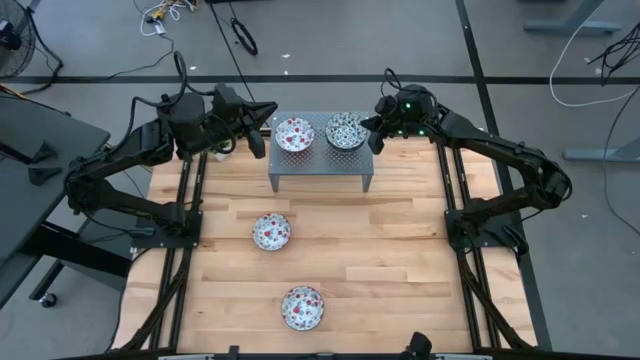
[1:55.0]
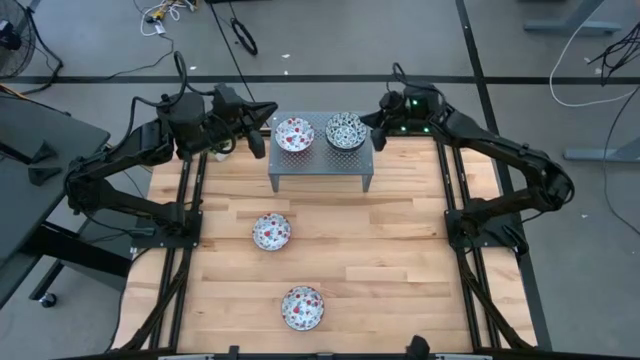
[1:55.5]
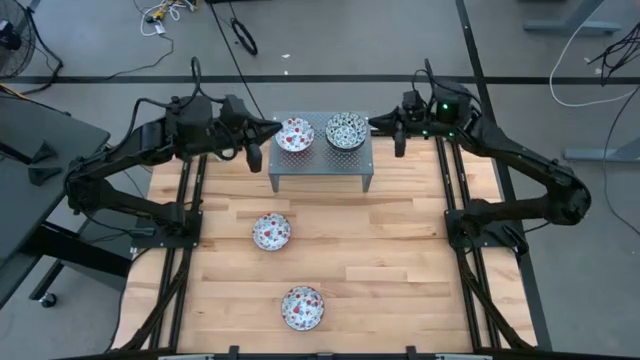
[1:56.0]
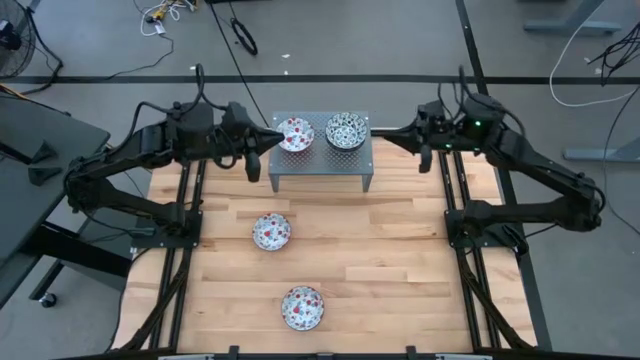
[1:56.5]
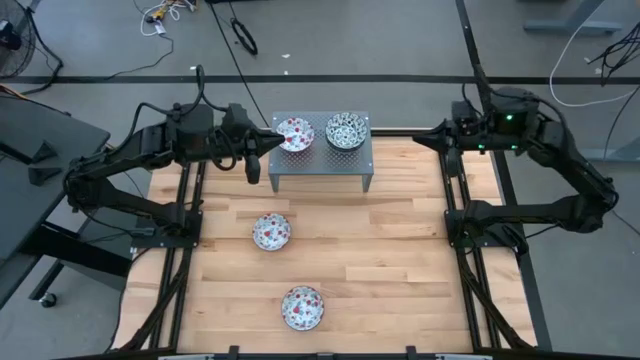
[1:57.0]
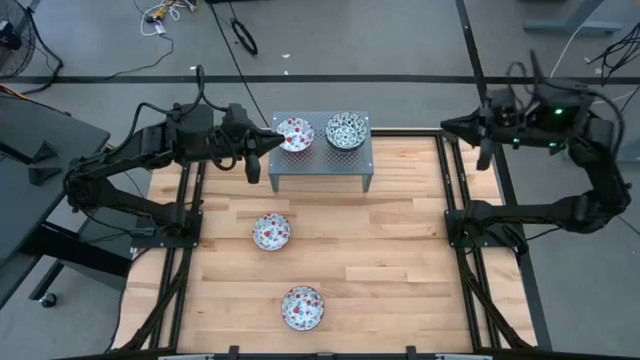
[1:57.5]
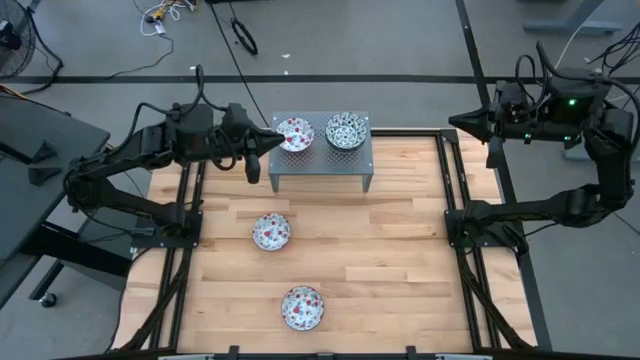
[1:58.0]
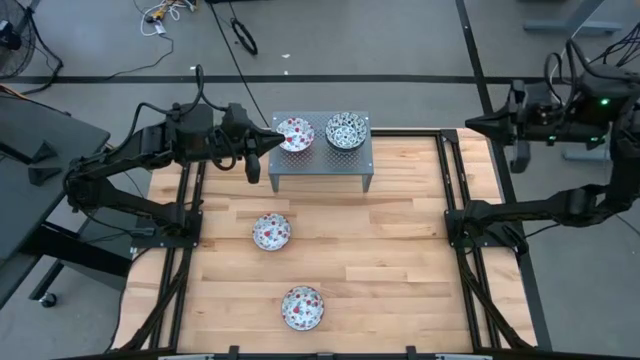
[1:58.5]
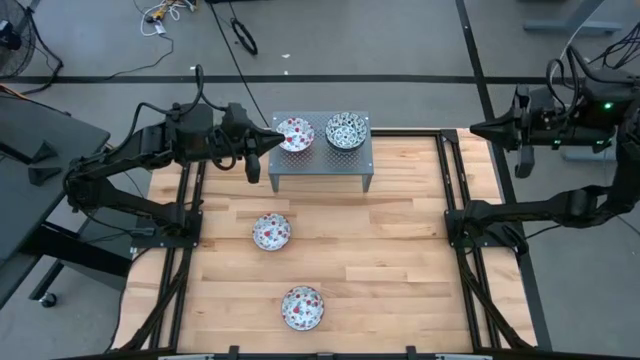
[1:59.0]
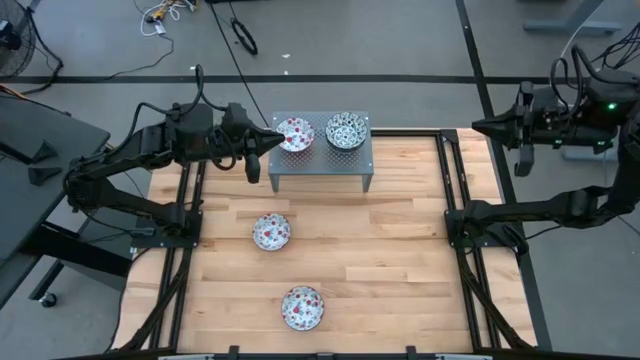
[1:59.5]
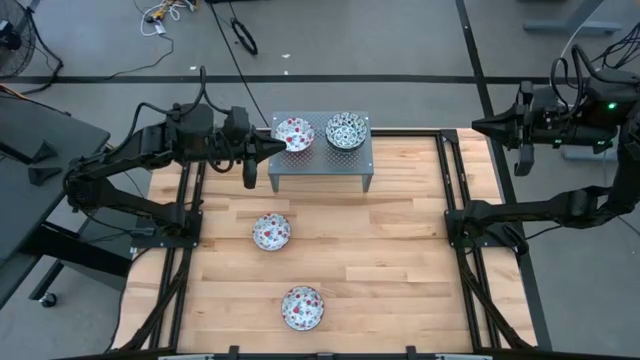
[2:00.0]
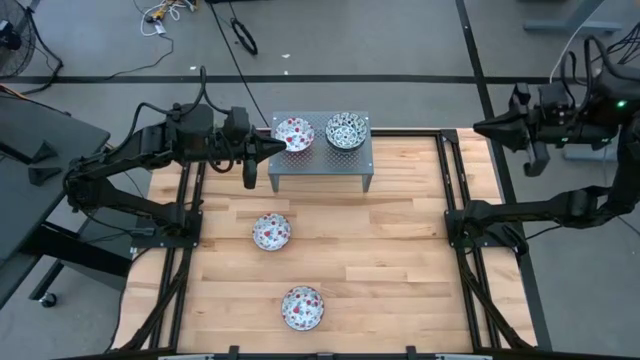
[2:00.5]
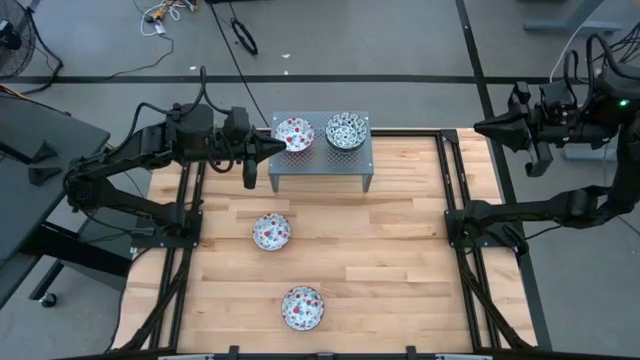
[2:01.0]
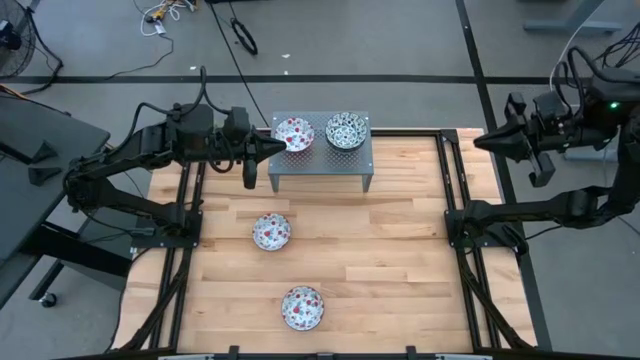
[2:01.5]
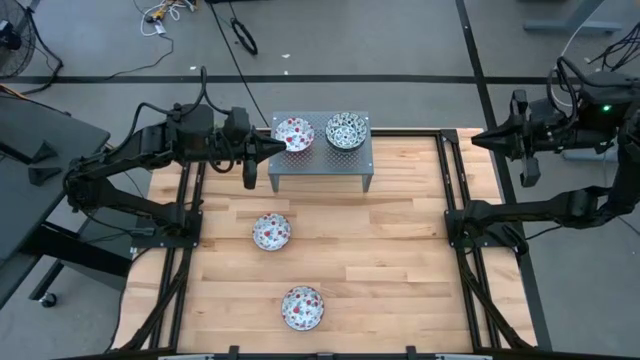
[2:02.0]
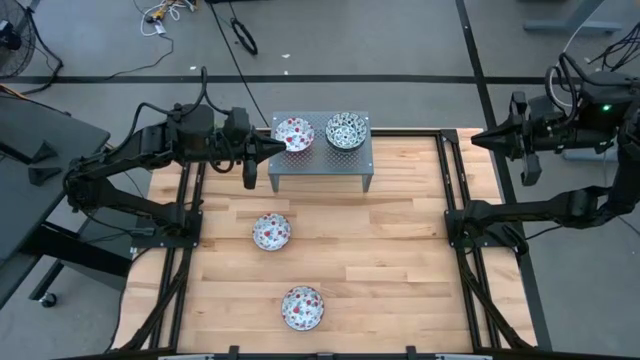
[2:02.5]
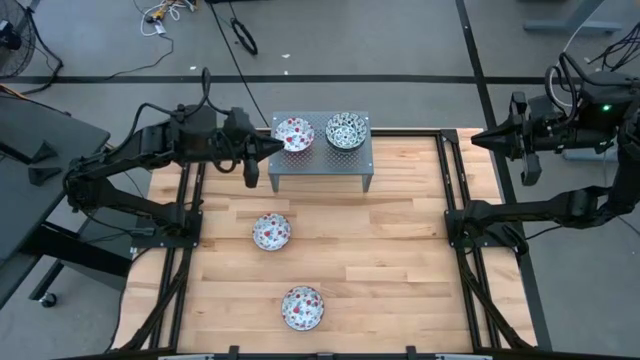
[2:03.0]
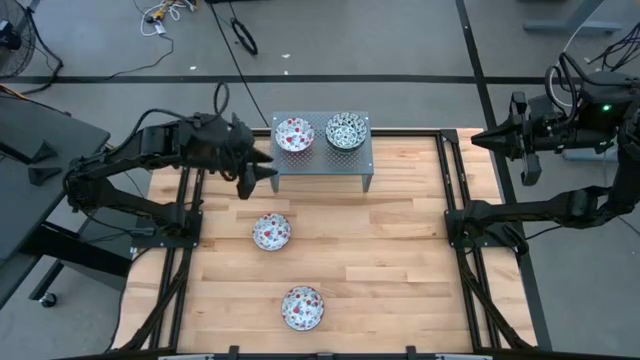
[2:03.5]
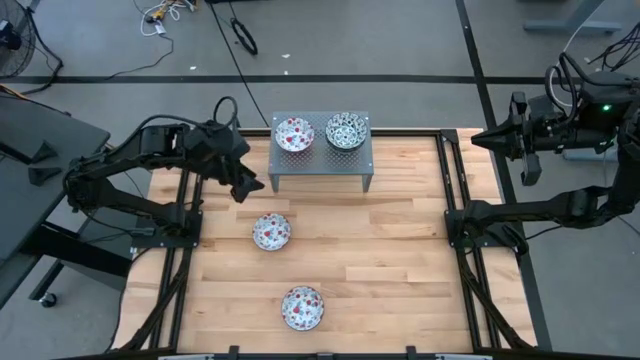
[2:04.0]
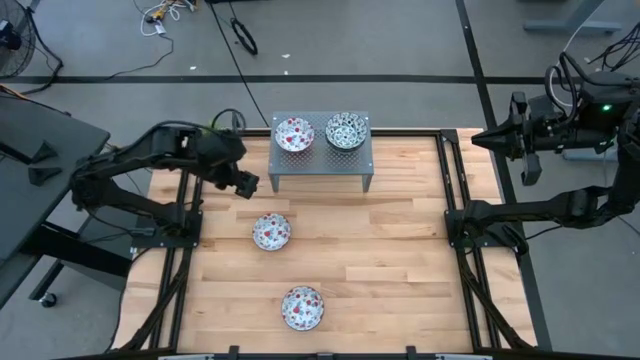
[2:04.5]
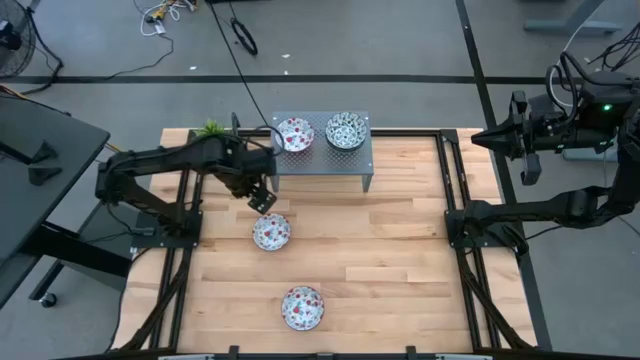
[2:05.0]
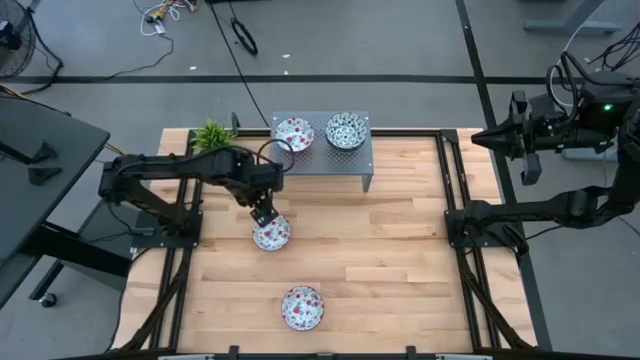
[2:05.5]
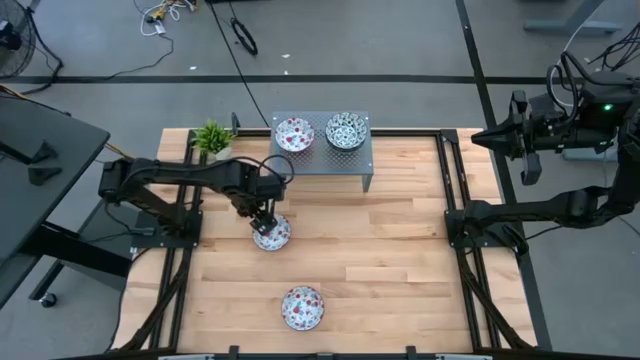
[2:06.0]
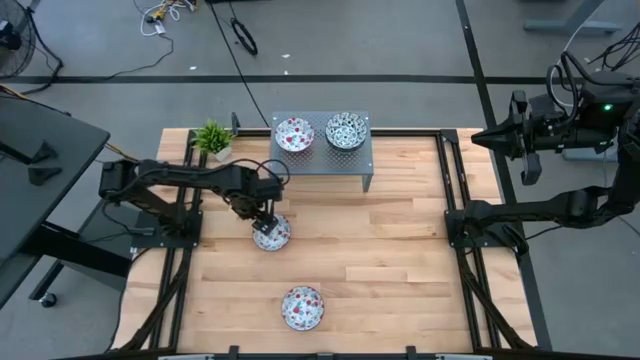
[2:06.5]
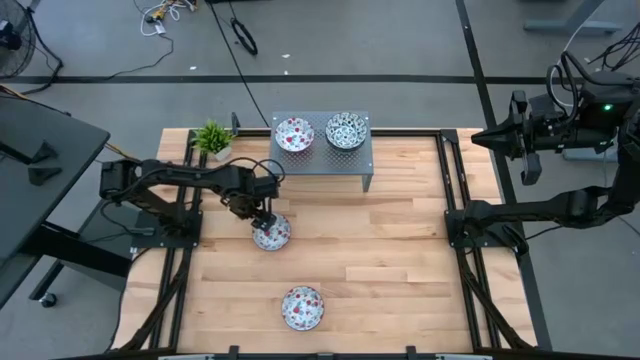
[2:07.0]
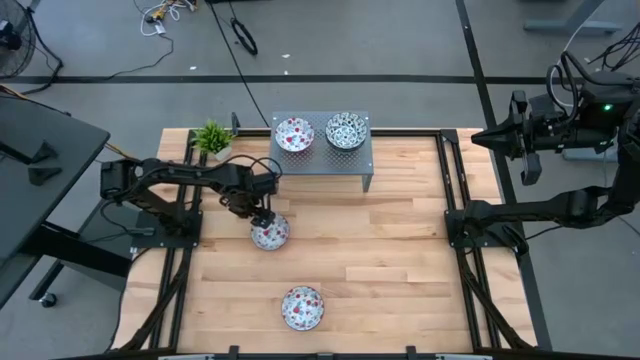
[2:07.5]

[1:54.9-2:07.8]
Task: Pick & Place Mini bowls
Stack the top red and white patterned bowl on top of the other red and white patterned bowl on the shelf

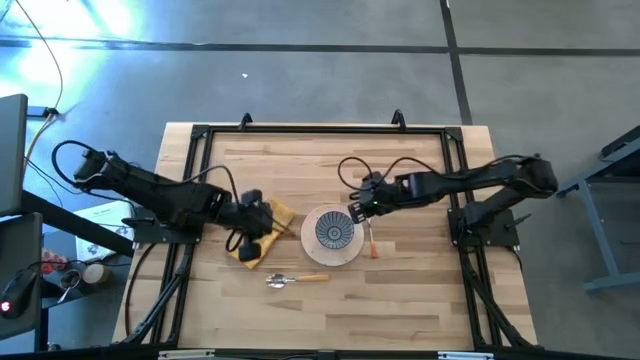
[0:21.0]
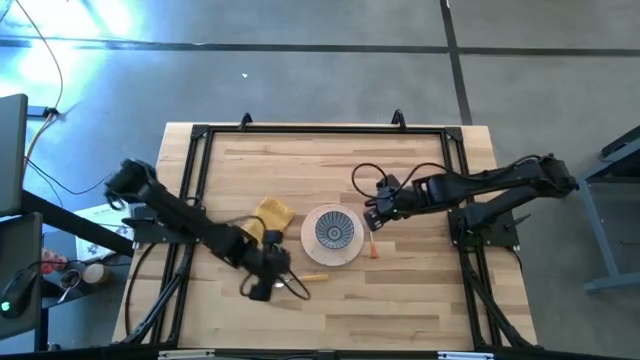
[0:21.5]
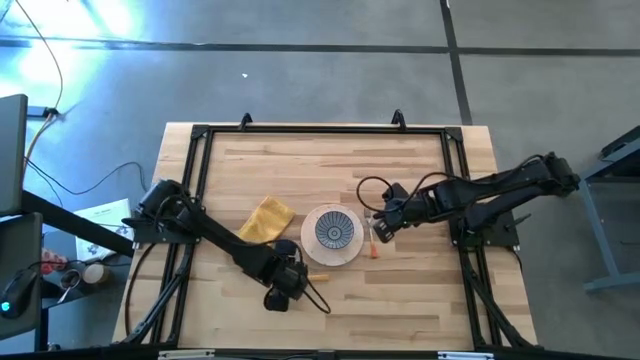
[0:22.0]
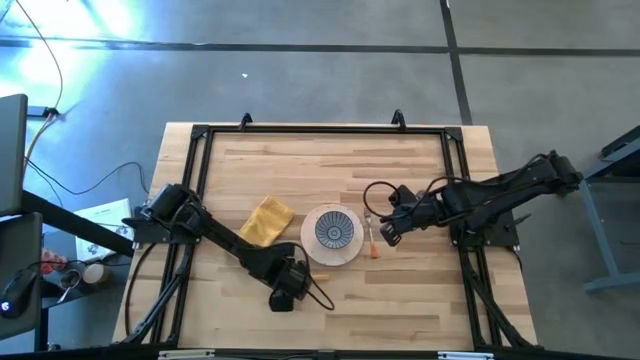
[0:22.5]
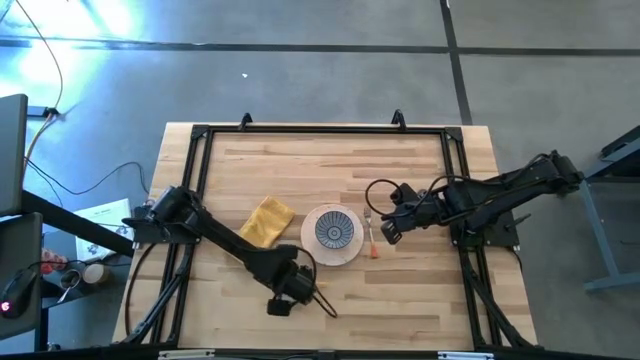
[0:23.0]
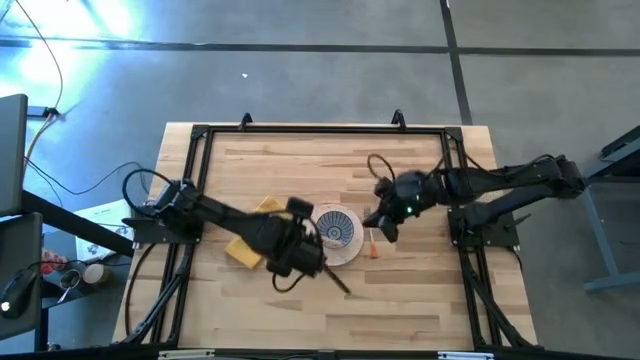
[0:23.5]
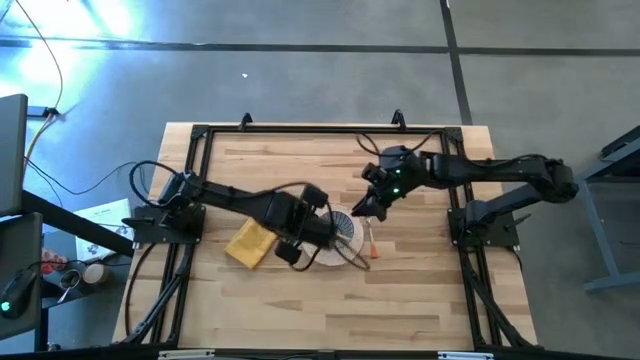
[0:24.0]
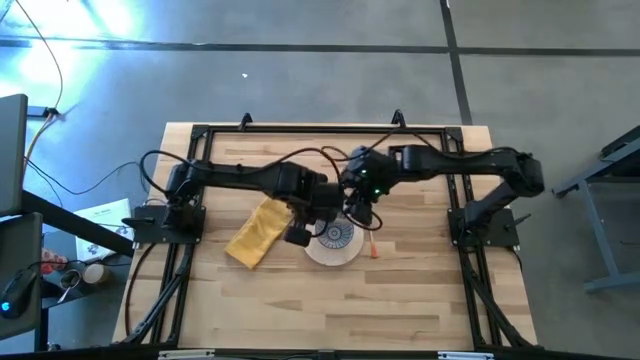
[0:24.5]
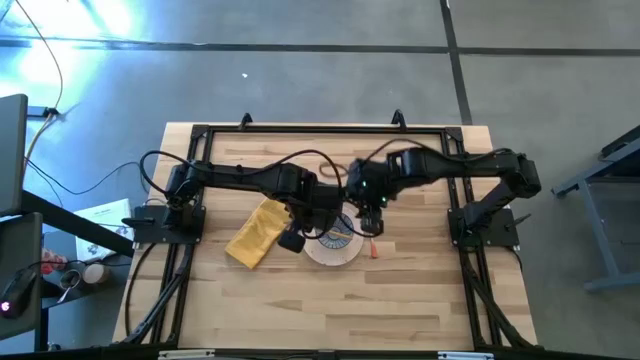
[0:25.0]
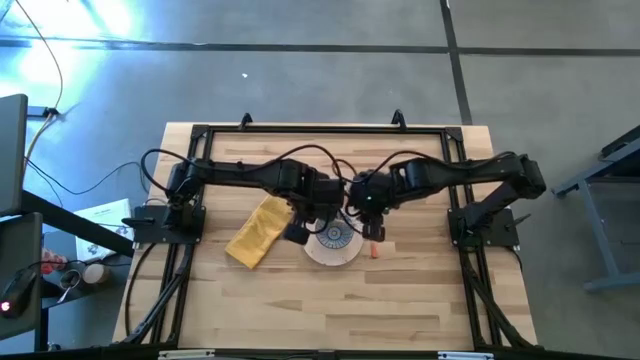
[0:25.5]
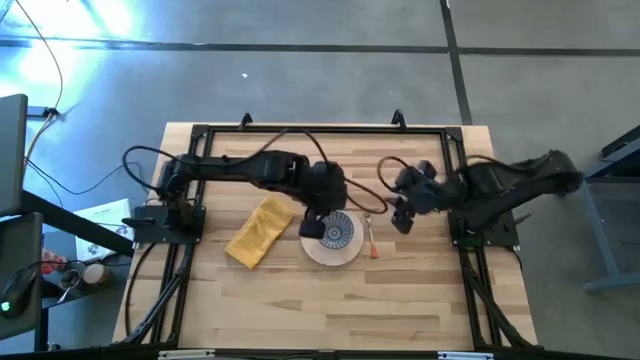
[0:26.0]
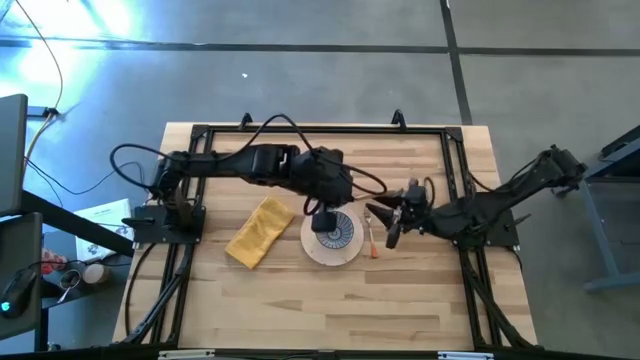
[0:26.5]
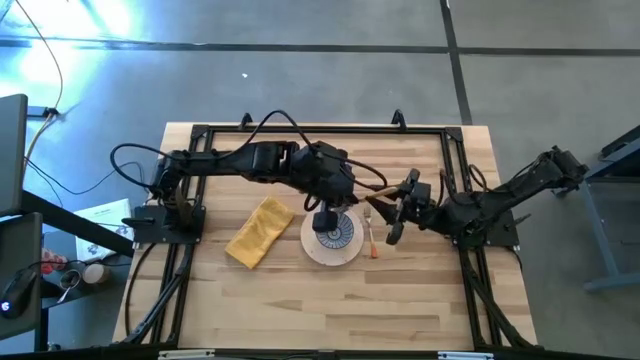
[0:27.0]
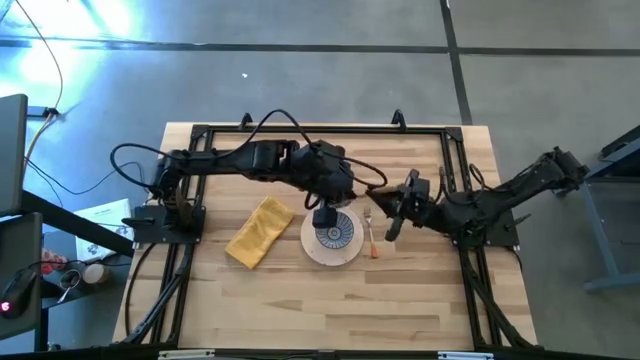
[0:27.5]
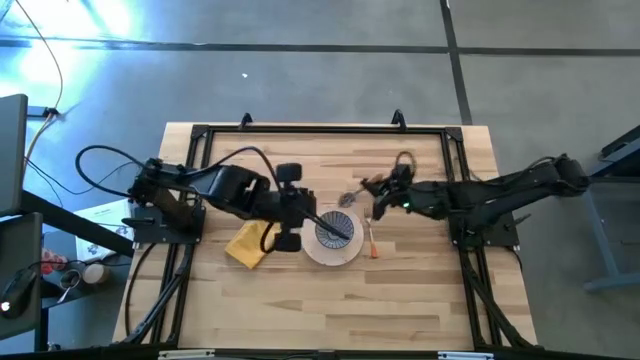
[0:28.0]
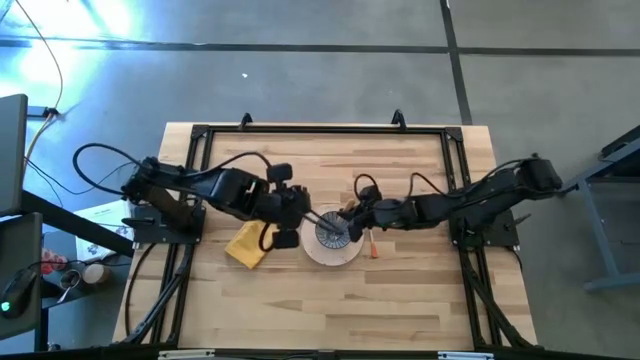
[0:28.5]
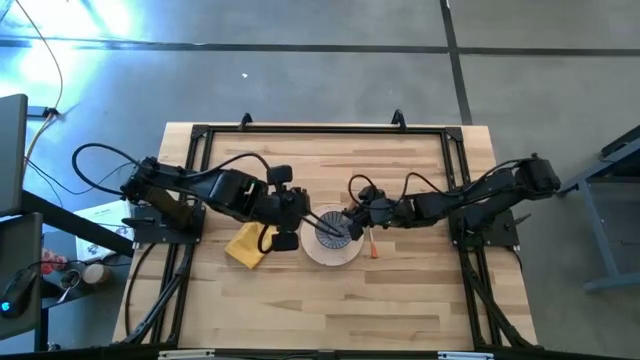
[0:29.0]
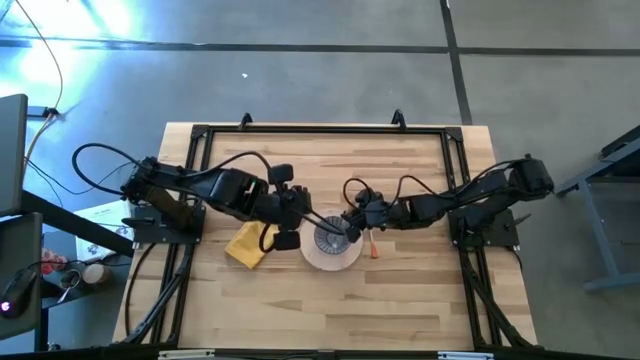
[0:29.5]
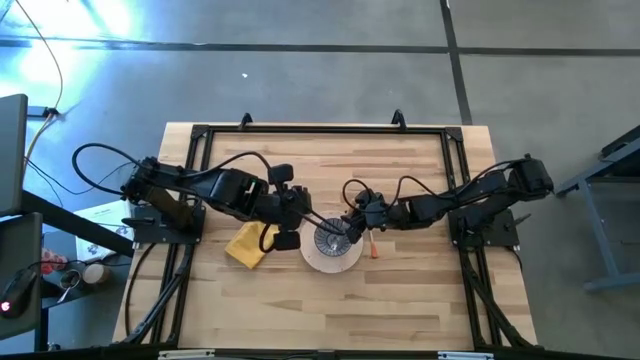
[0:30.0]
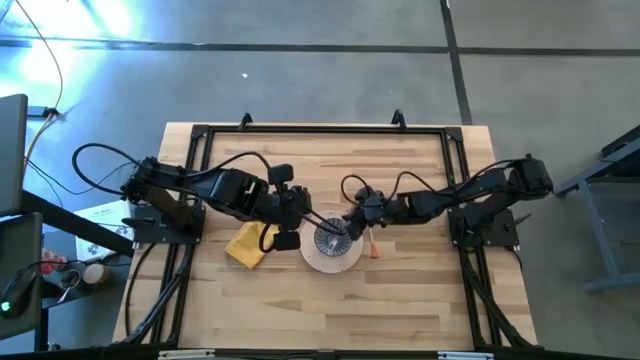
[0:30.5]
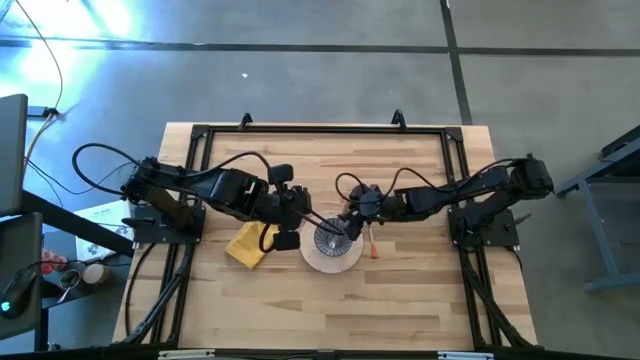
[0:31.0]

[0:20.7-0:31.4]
Task: Set table place
Put the yellow spoon into the blue patterned bowl
